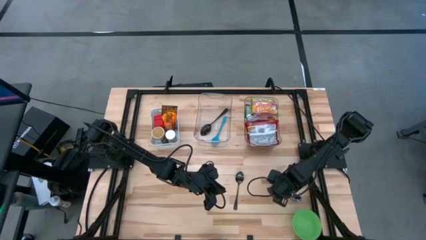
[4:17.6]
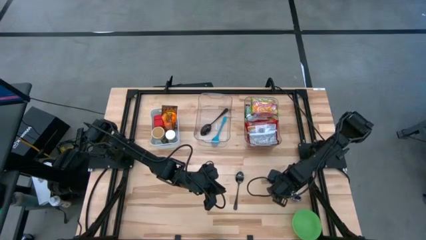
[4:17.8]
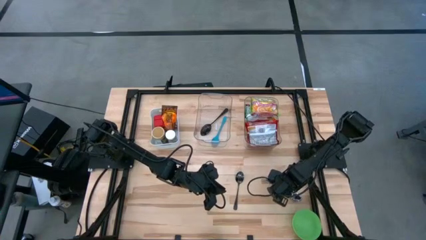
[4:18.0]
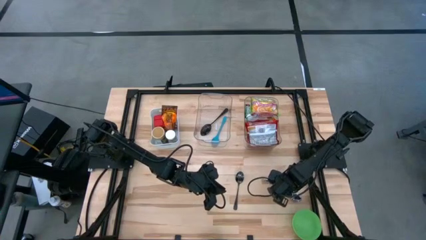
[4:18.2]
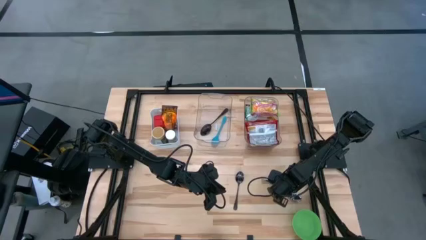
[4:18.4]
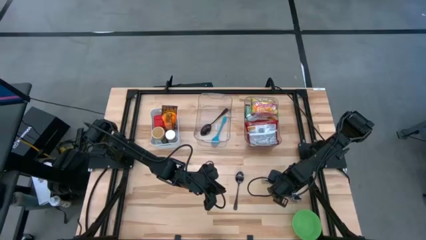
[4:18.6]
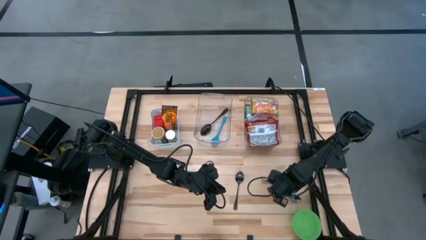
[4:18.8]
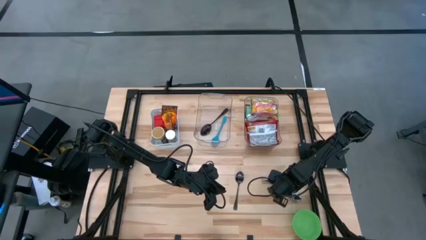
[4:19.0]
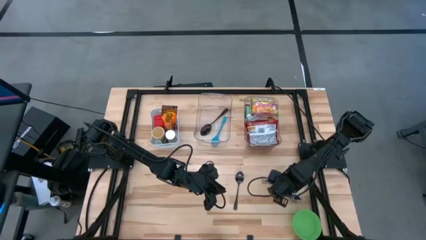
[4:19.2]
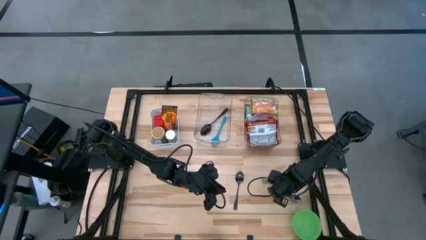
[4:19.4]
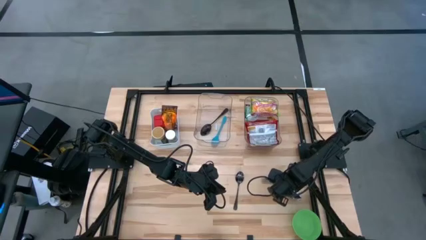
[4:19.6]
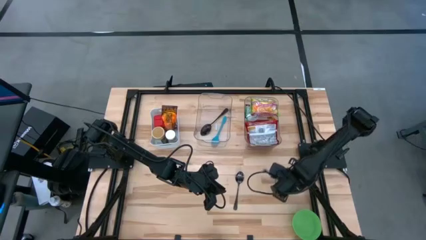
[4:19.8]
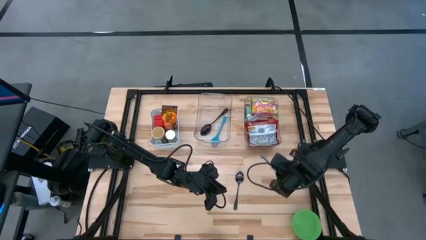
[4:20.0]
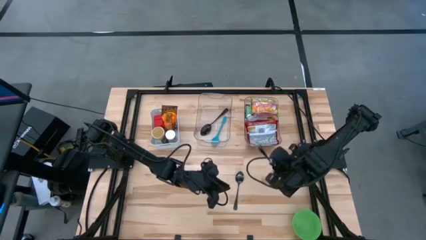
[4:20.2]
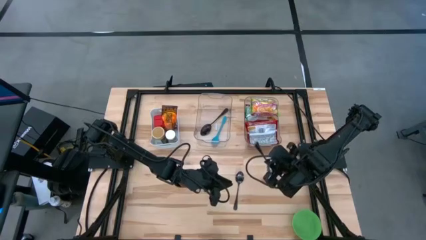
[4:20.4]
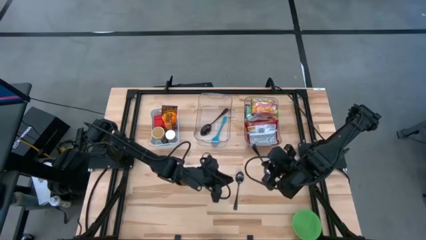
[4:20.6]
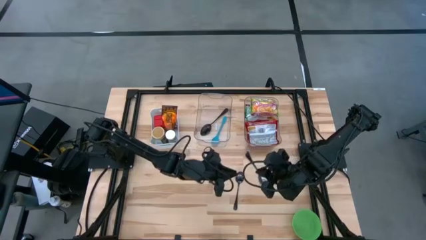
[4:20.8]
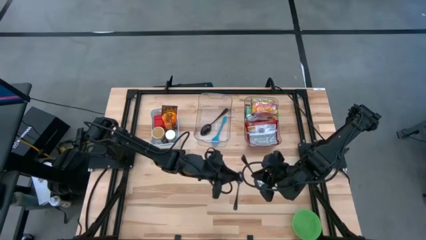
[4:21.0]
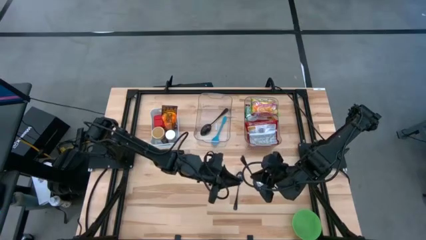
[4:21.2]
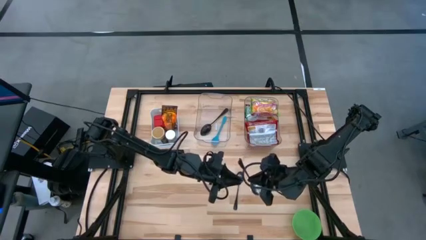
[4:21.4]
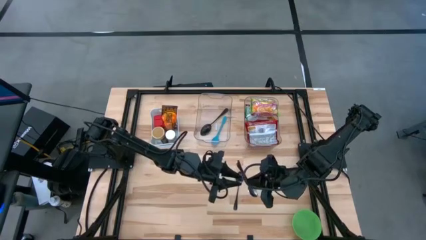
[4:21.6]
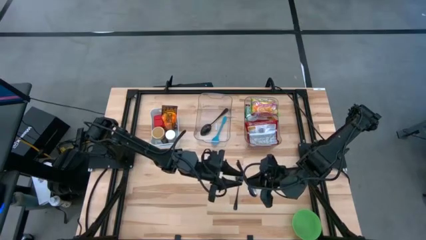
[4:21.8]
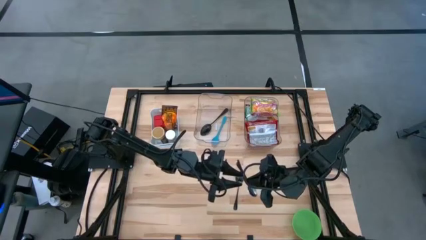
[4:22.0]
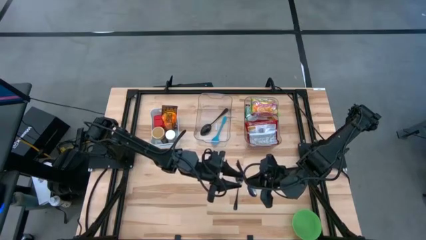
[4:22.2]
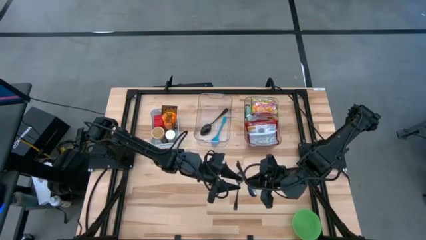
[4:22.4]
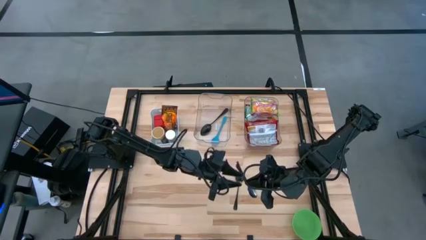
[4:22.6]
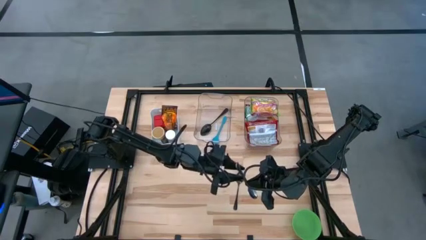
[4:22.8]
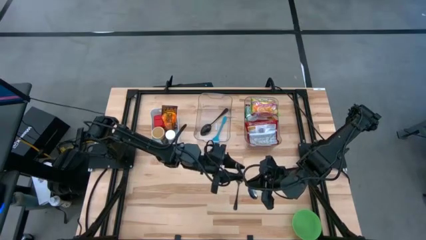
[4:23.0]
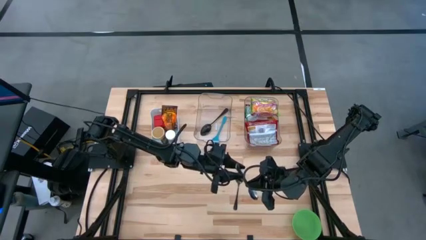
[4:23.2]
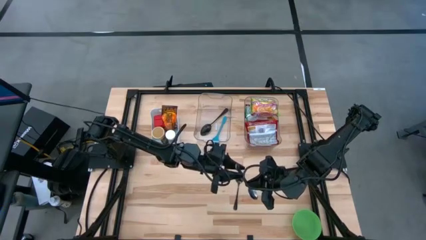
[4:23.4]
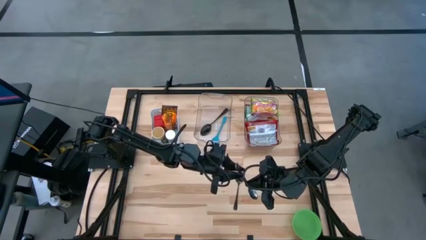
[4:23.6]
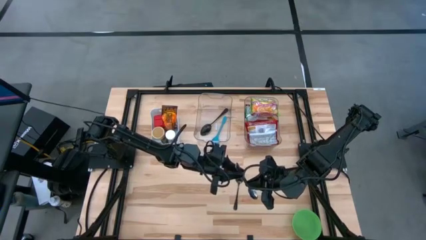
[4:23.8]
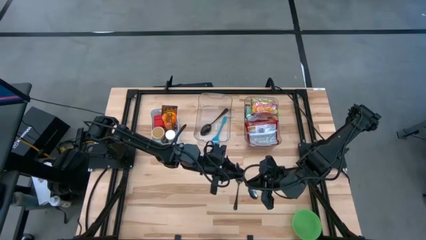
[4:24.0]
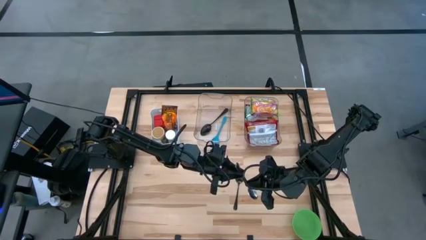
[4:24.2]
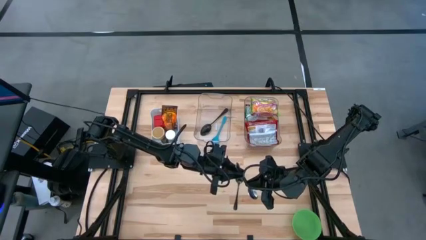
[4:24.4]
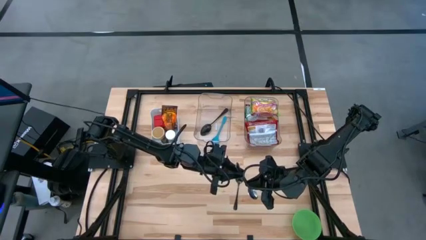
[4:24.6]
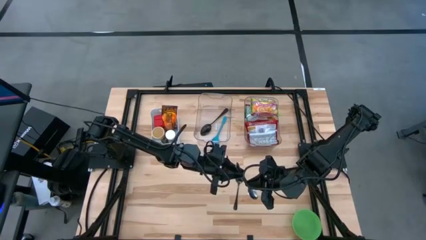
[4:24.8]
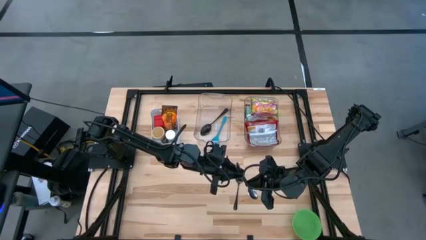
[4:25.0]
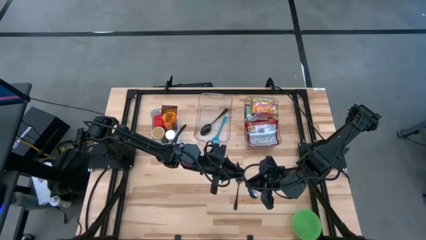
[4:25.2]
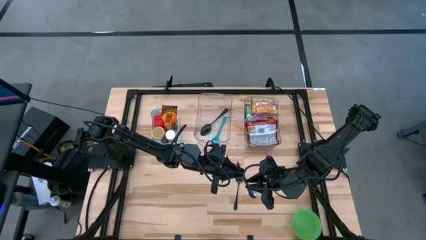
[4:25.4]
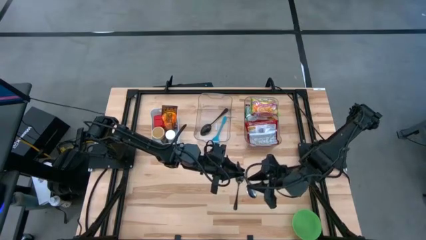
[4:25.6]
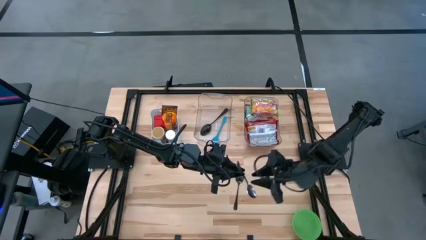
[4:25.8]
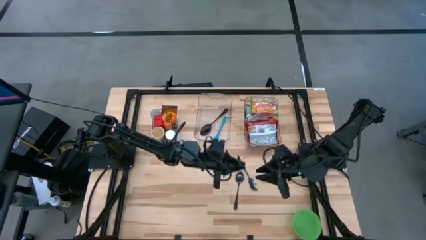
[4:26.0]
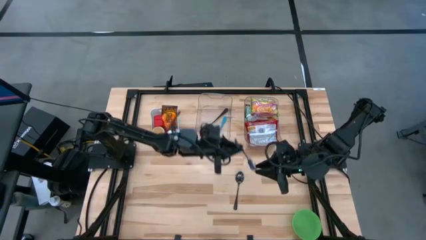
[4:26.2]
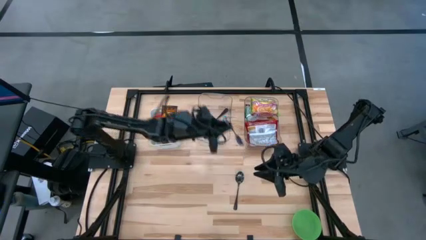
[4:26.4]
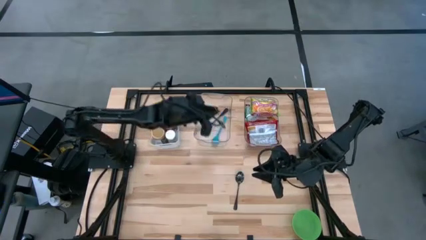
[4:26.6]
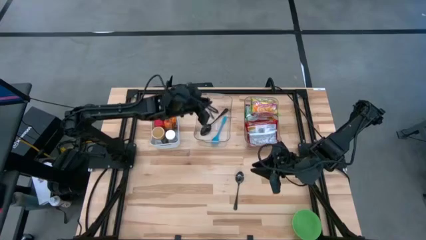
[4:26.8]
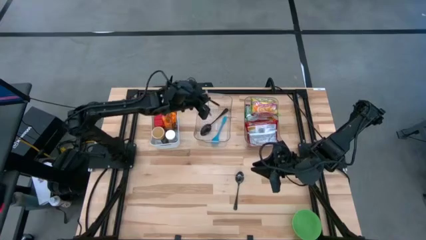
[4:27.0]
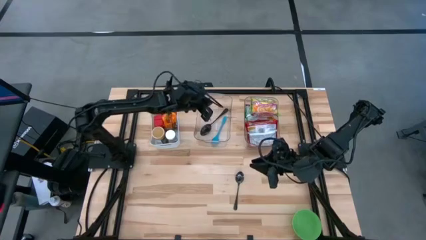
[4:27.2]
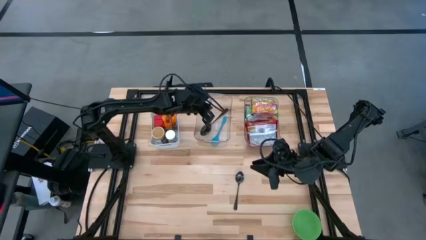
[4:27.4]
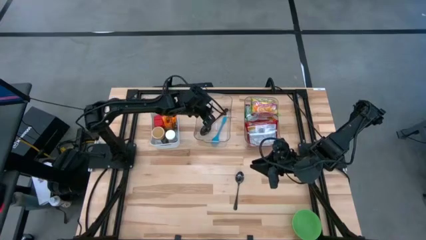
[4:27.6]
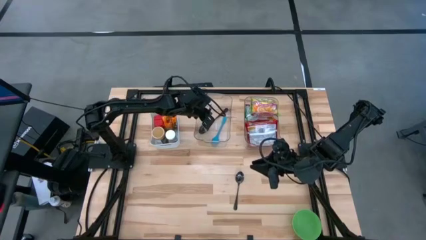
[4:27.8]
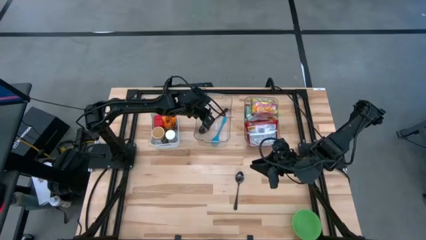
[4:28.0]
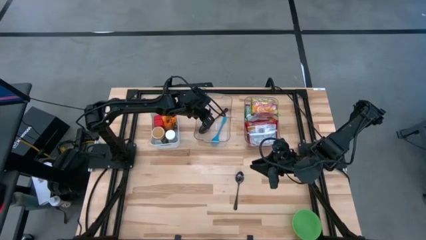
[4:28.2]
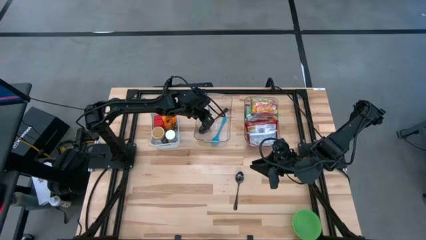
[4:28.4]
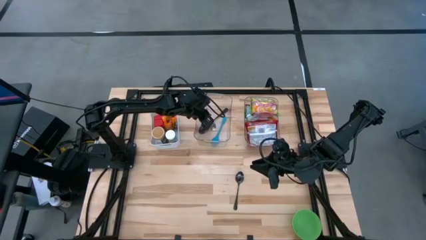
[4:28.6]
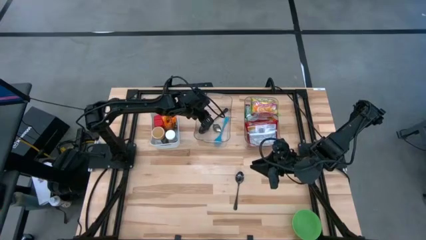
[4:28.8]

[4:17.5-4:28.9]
Task: Pick & Place Food Item
Put the silver spoon into the left transparent bin
